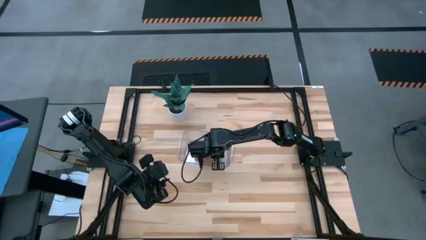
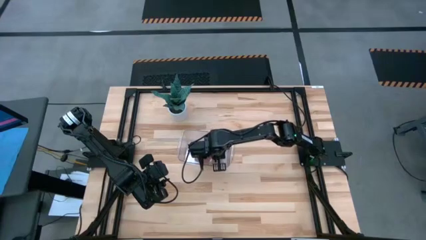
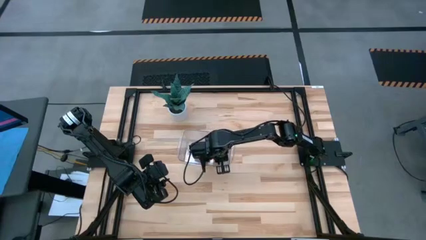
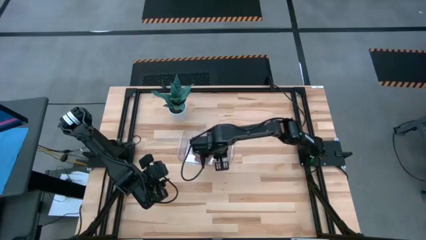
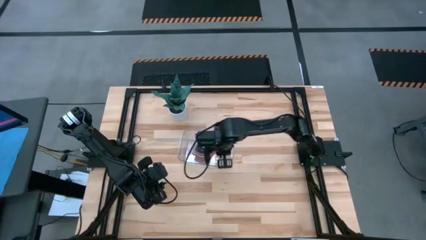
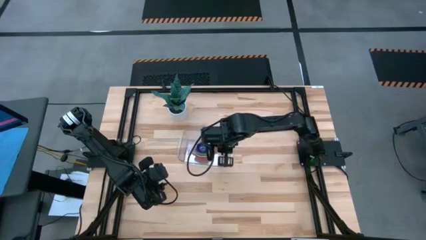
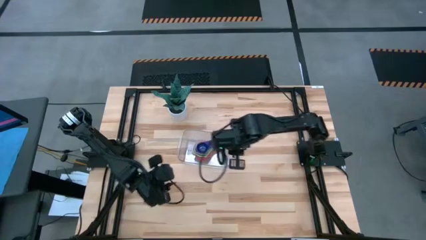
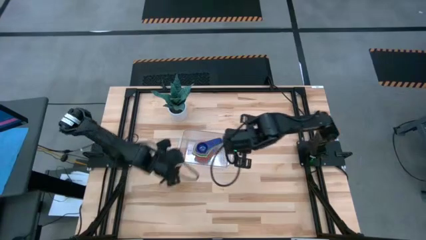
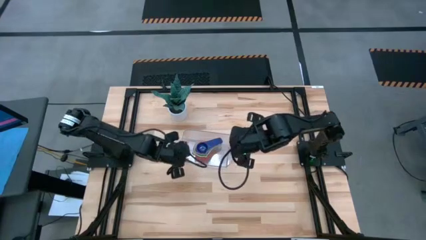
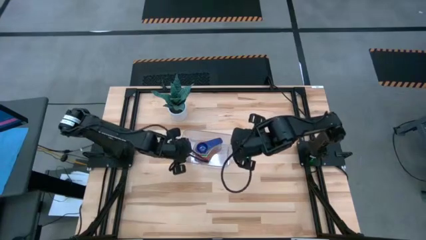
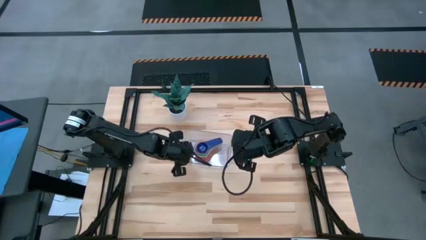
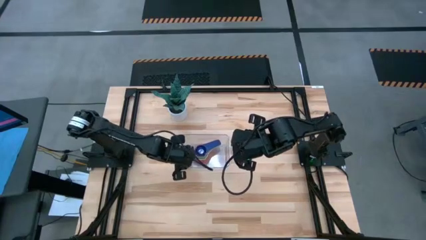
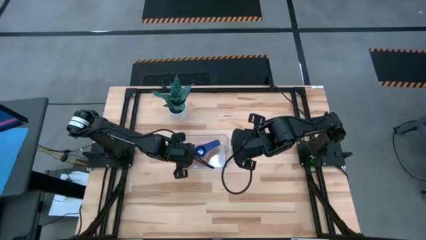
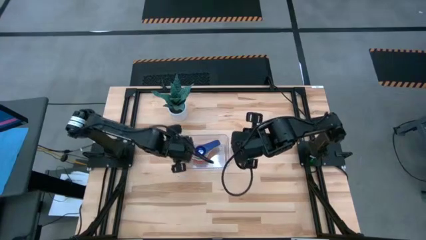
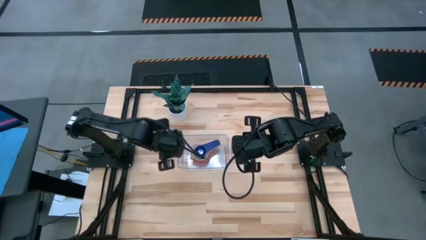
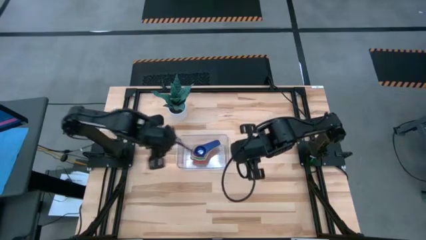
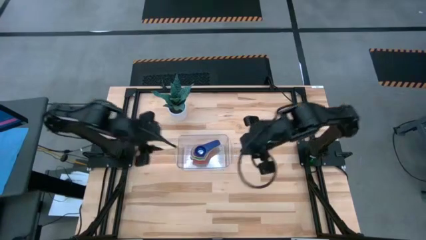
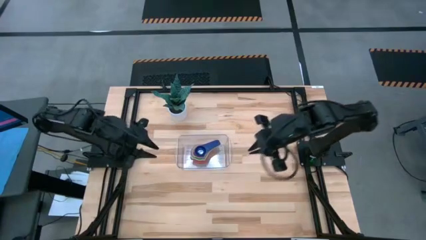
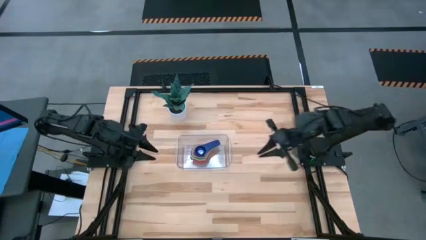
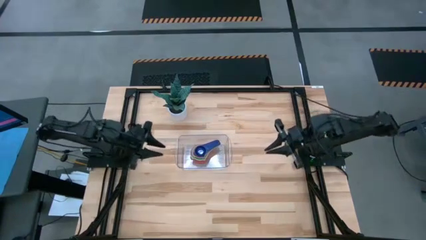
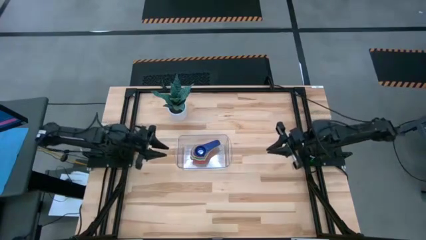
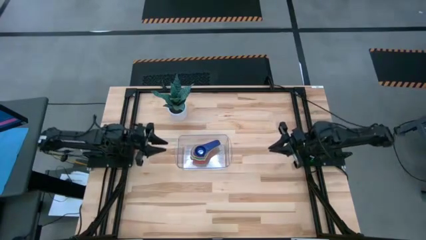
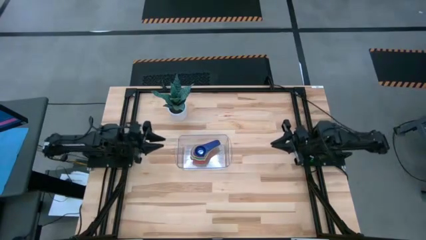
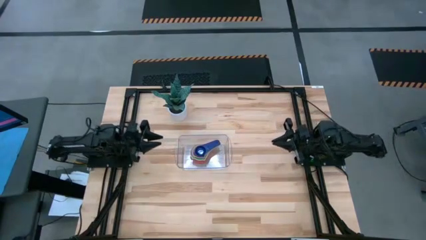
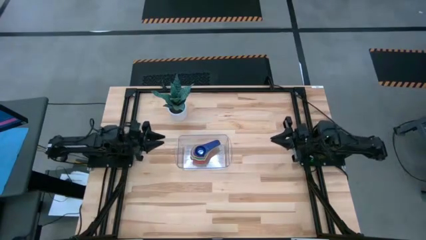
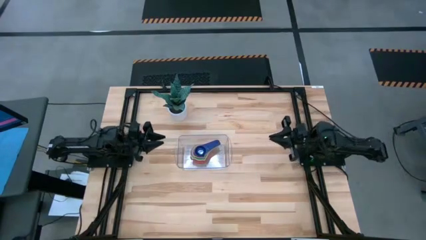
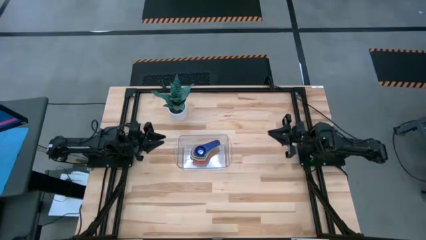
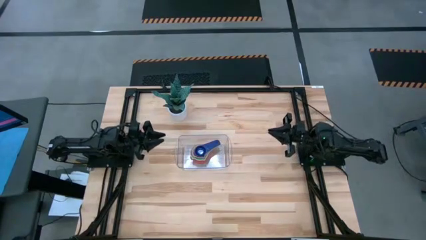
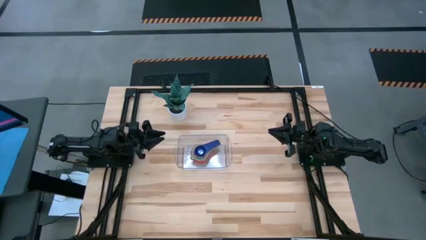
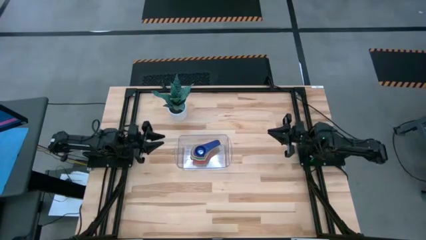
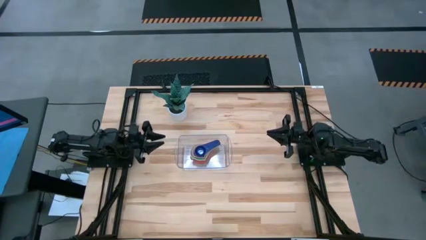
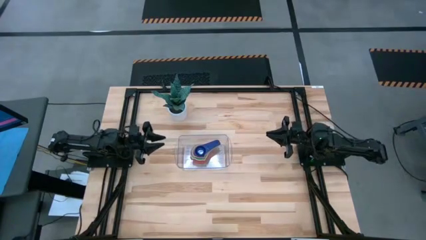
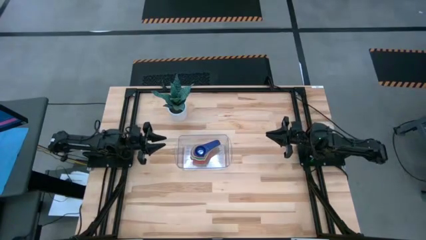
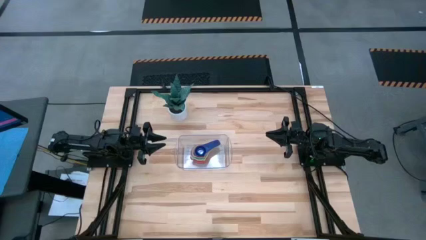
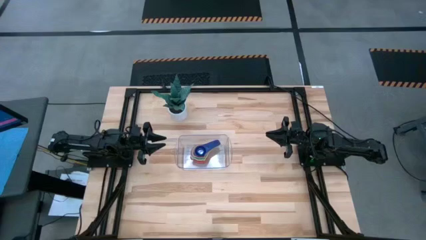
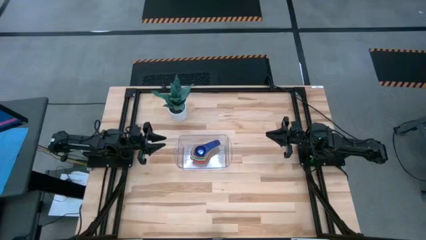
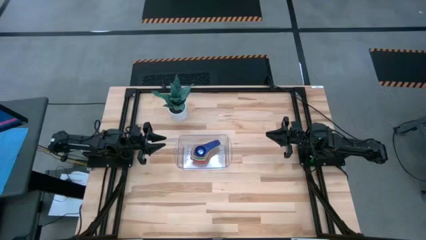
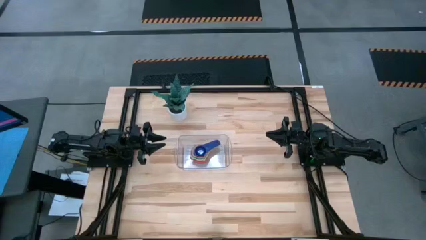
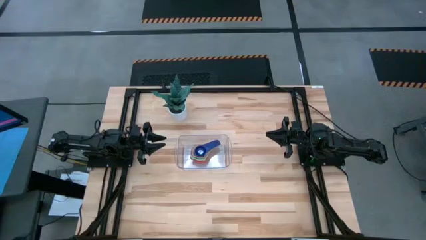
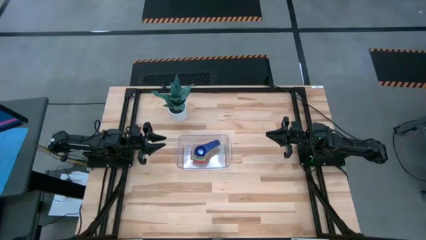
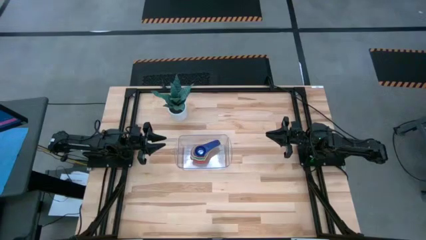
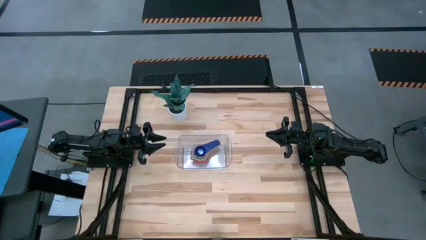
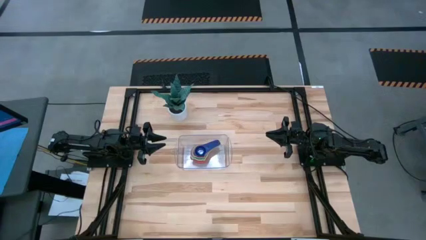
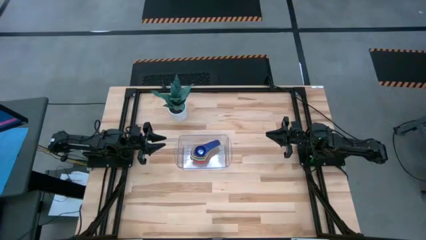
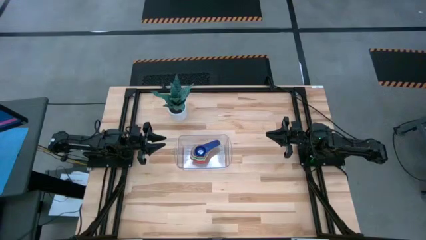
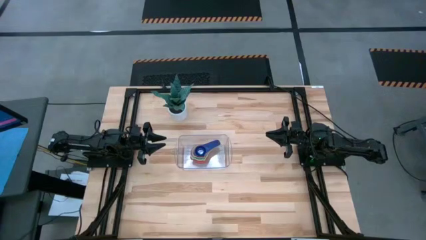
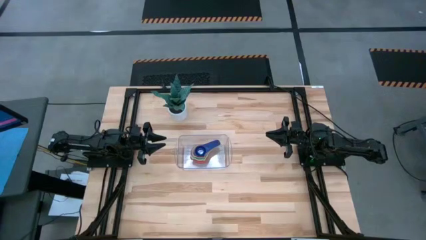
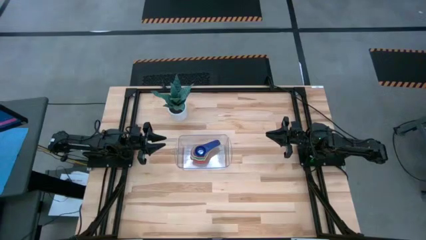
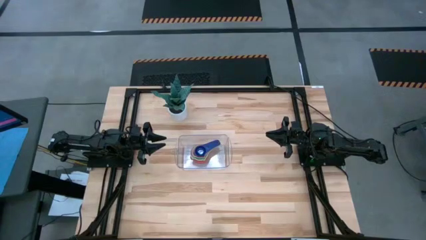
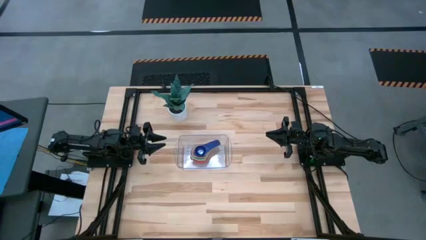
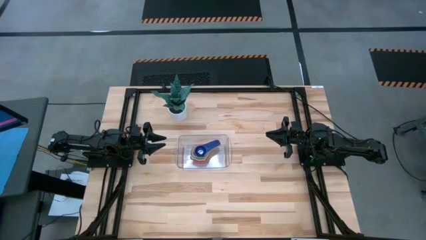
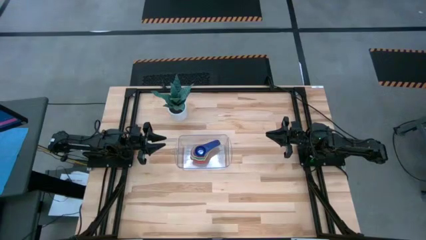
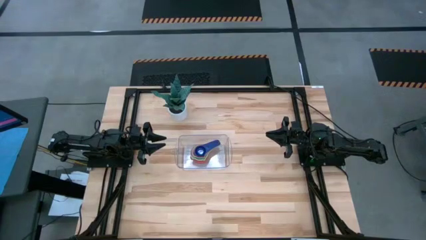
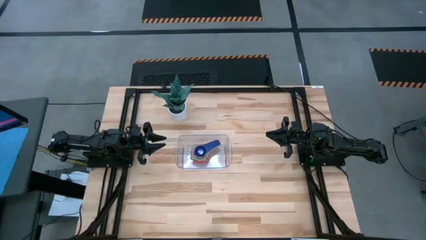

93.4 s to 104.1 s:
Task: Nest measuring cups in basket
Return to Home Position

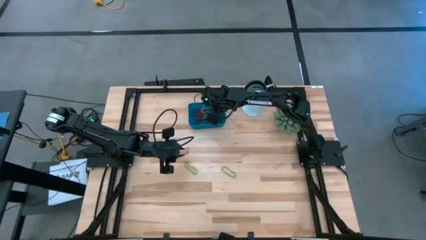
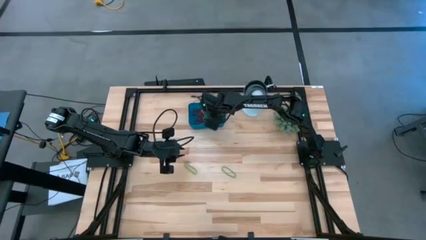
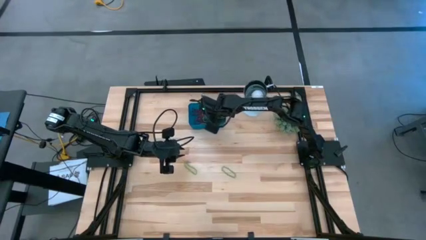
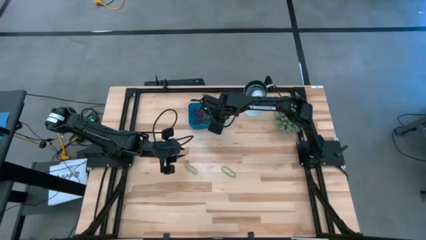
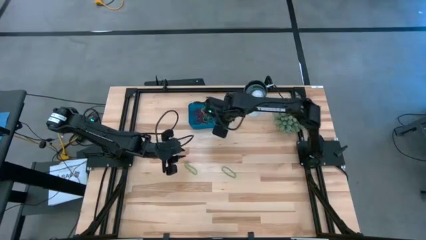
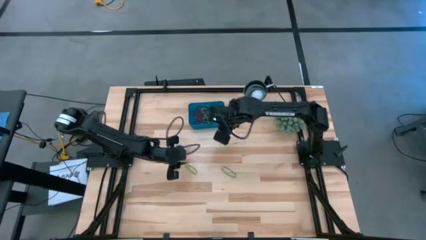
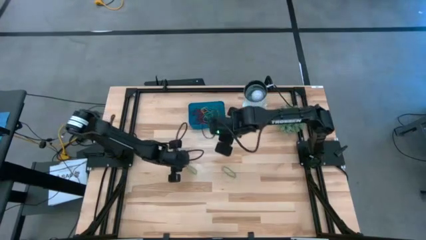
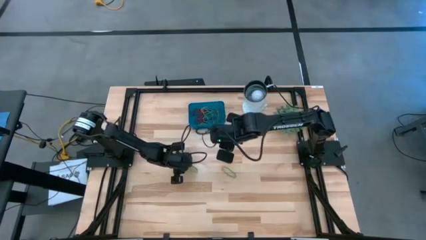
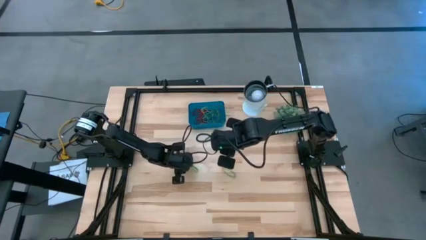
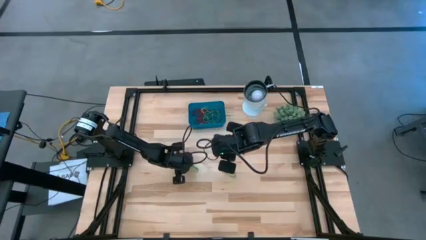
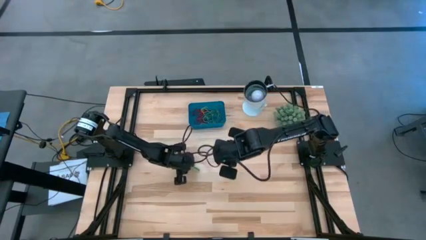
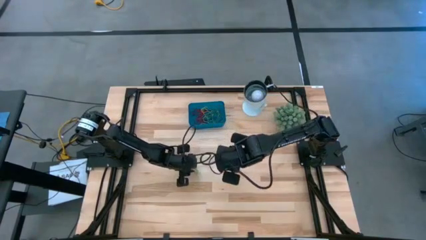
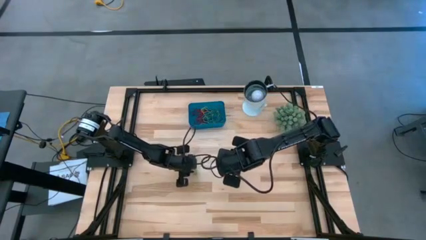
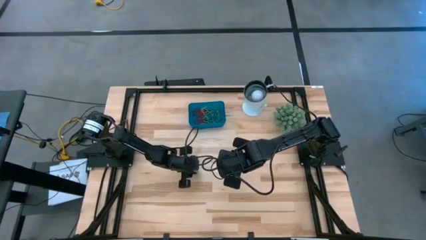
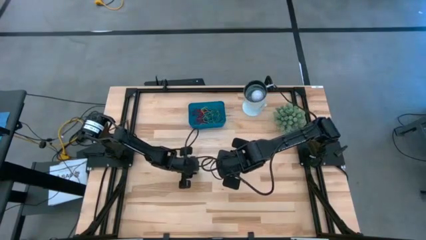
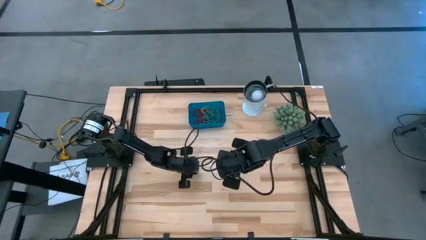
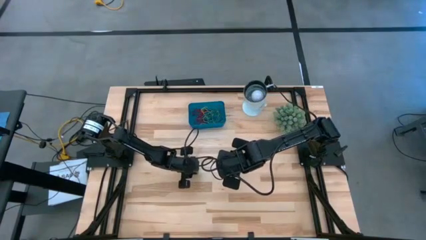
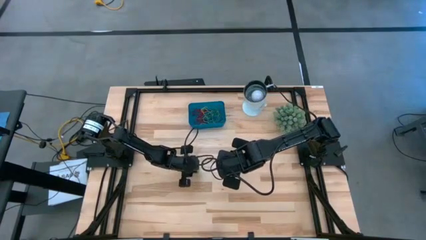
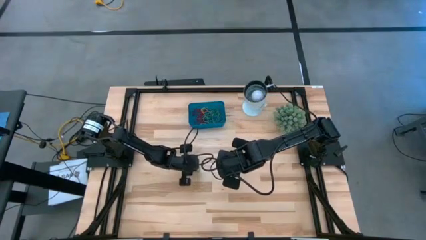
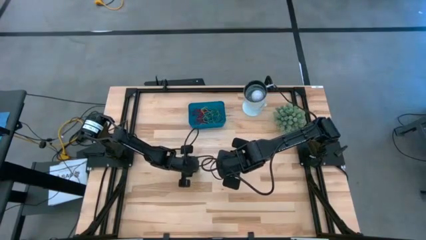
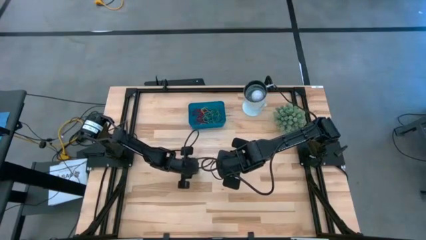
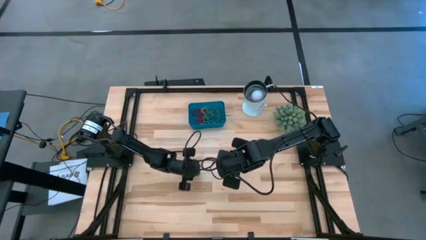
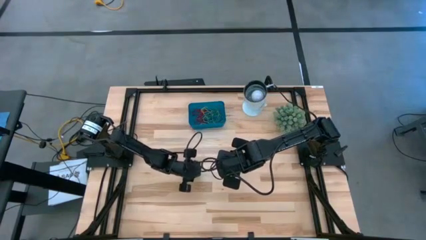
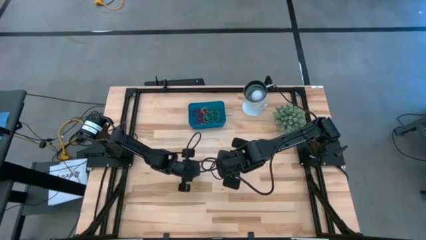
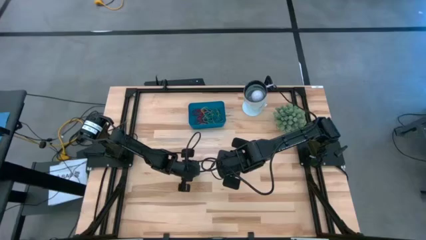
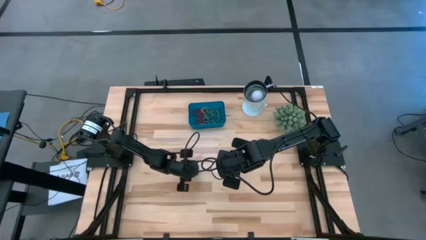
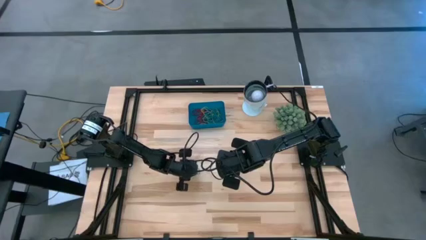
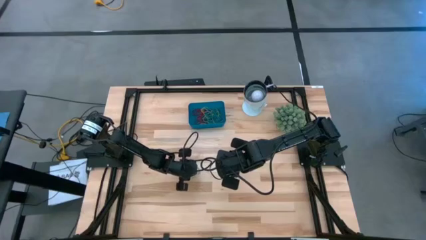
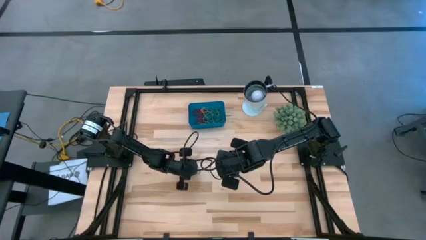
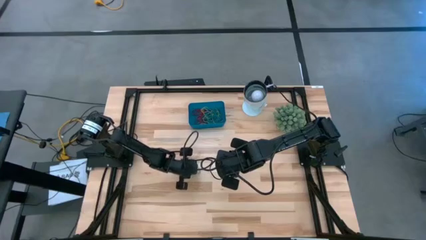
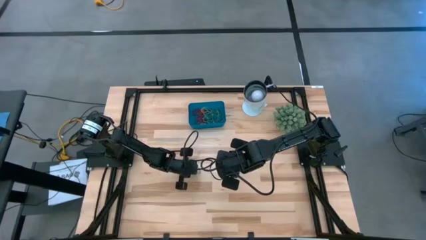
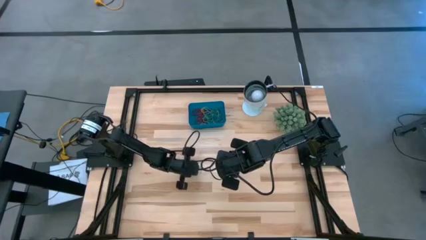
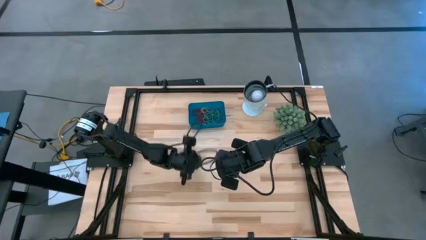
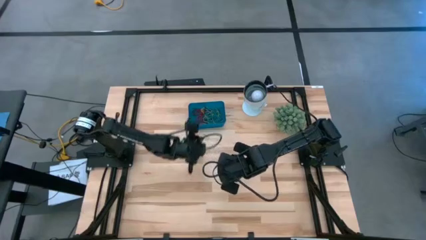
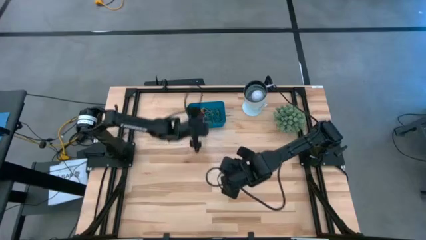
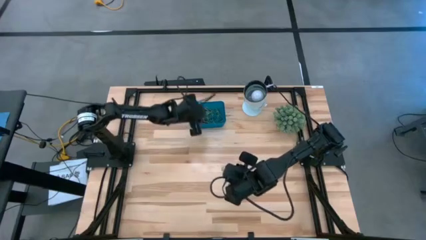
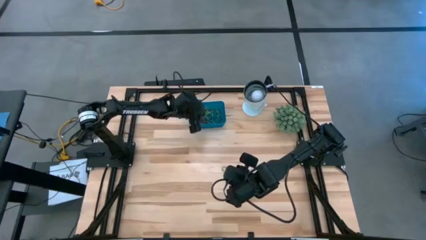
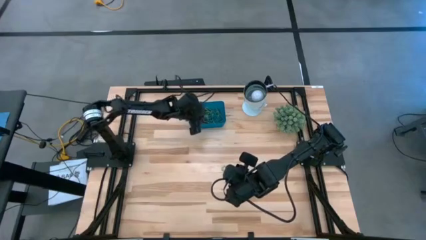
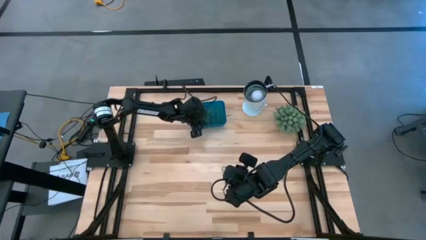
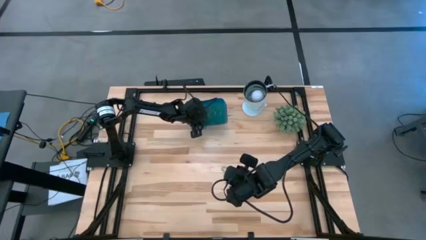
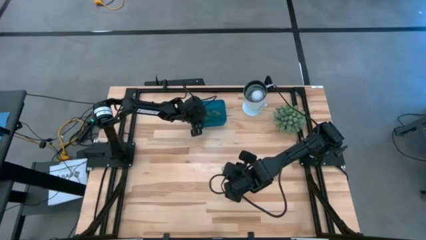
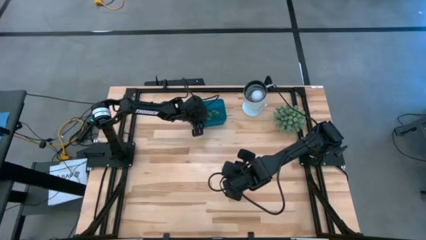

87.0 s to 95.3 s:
Task: Pick and place items into bin
Put the green rubber band into the blue bin
